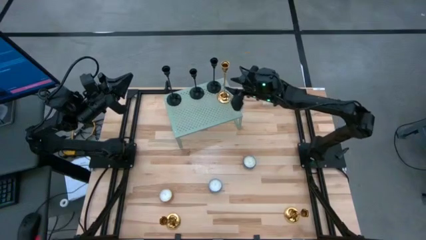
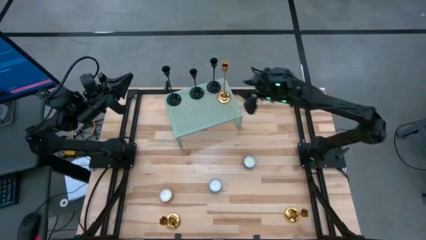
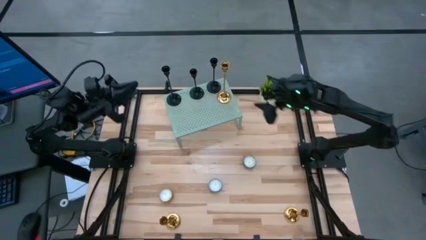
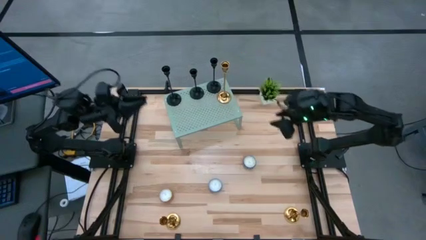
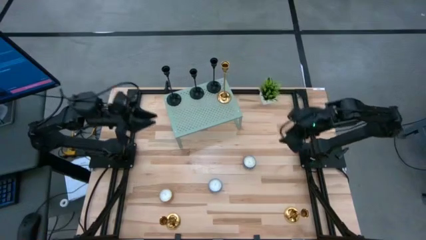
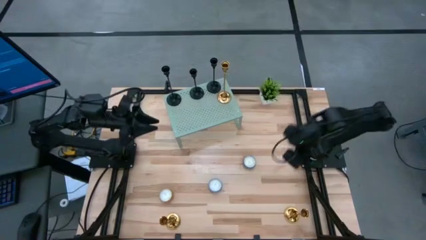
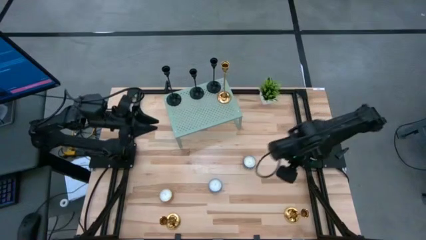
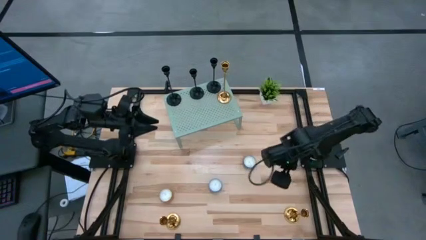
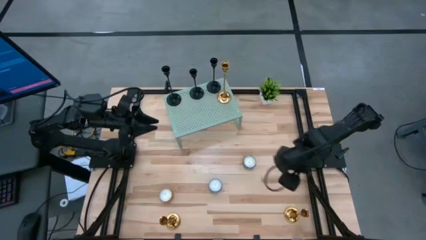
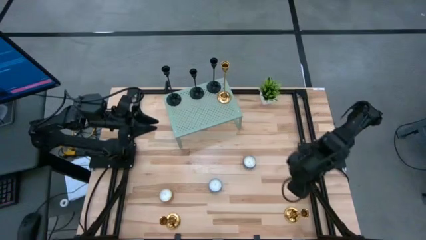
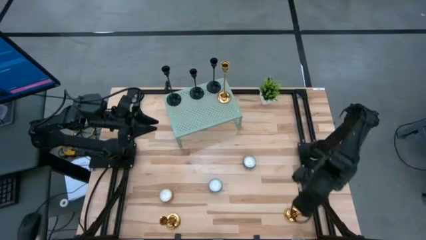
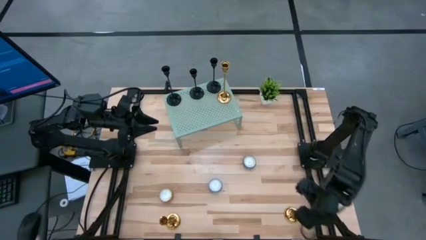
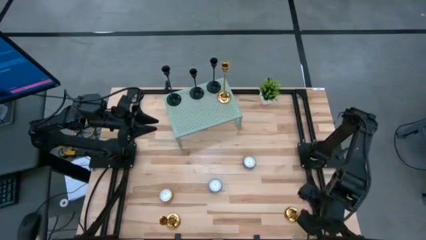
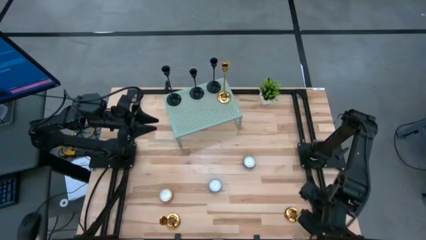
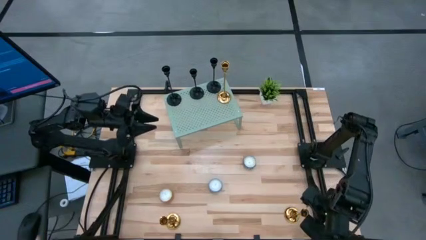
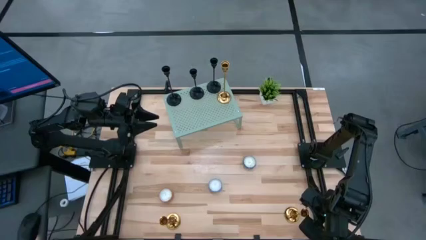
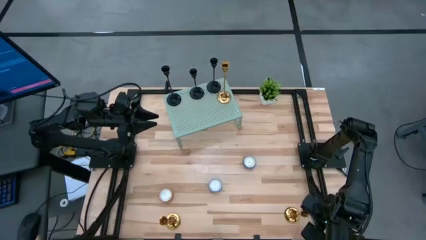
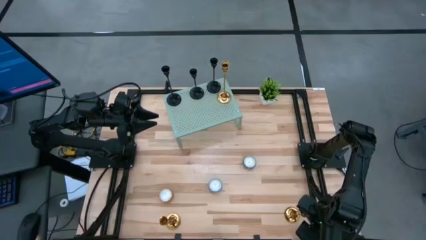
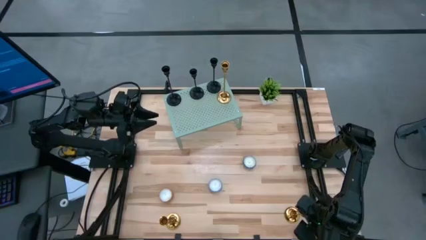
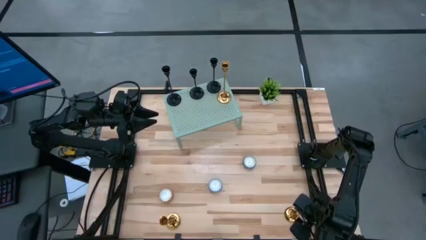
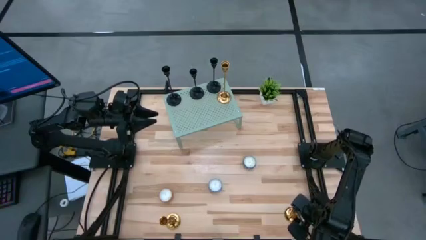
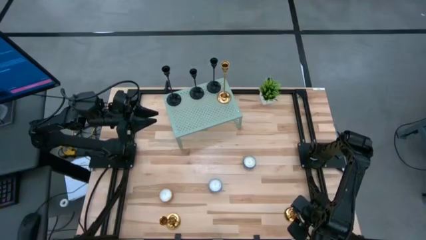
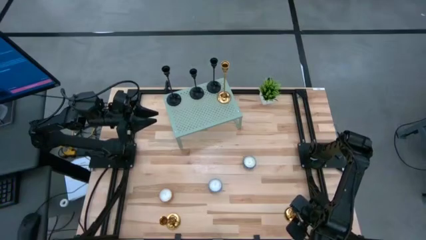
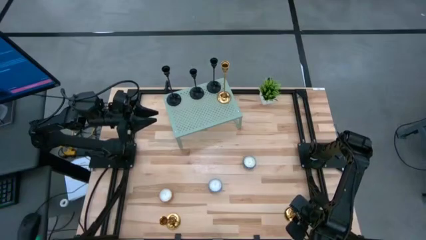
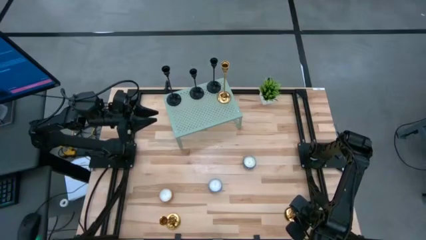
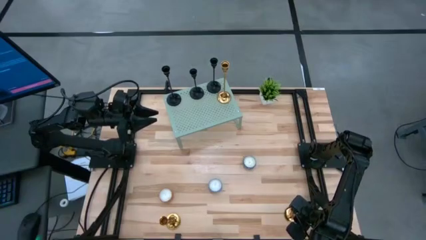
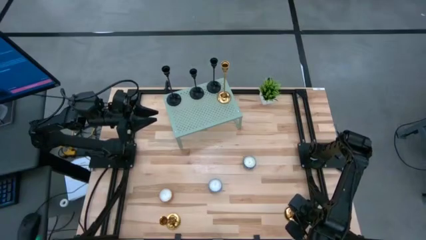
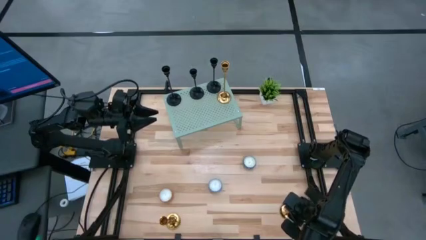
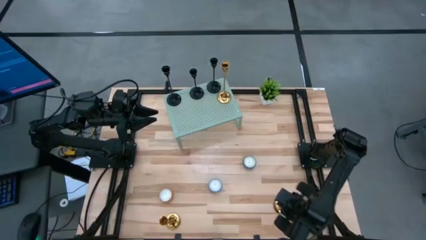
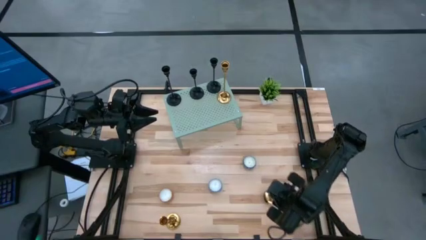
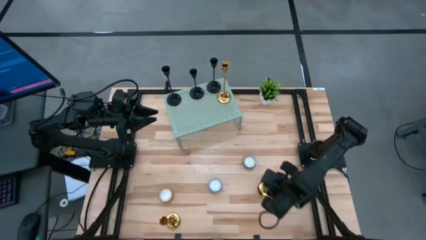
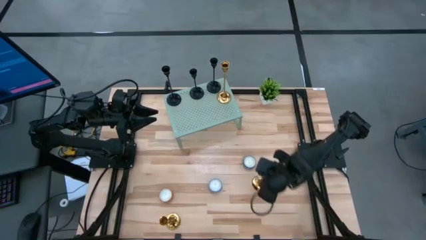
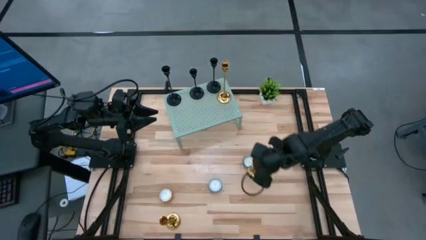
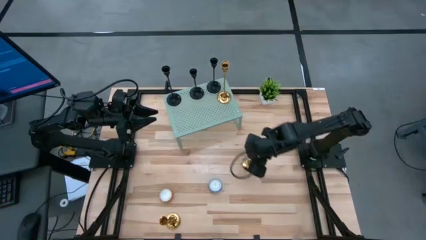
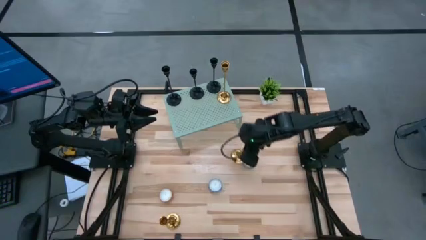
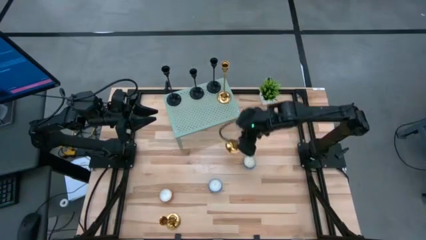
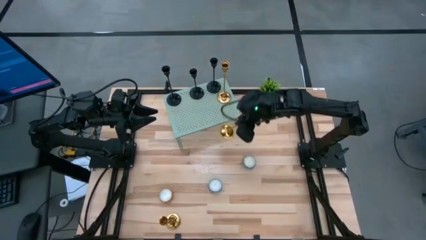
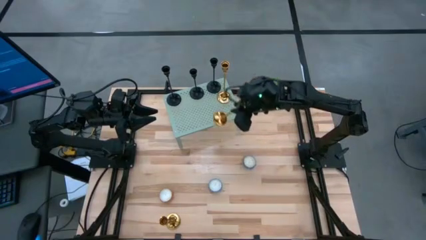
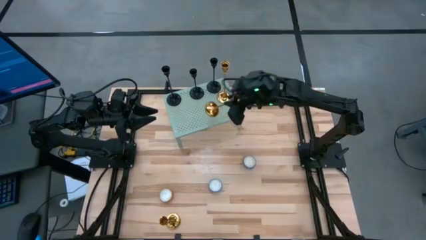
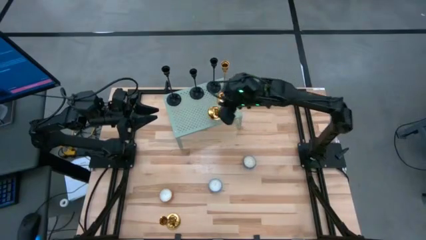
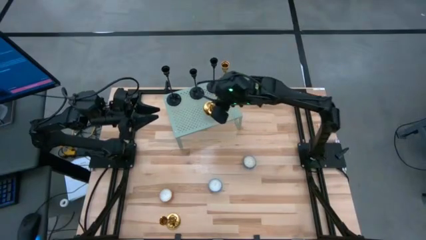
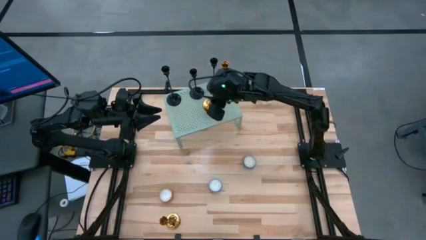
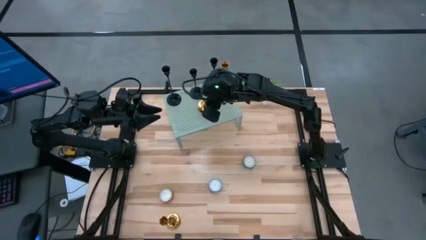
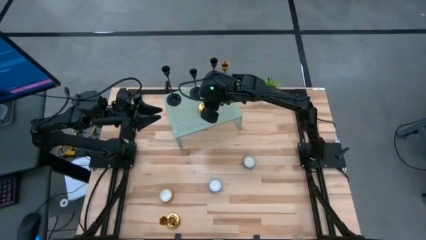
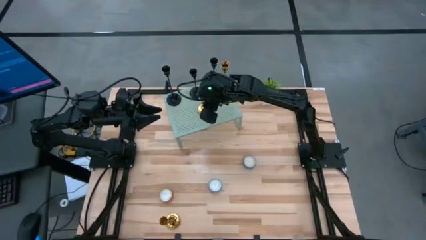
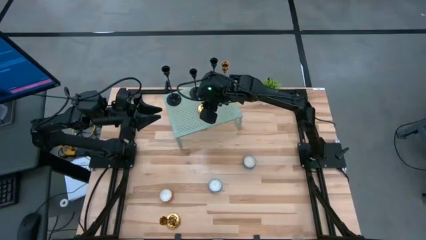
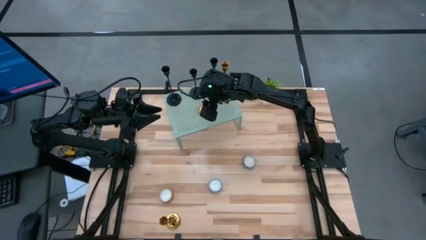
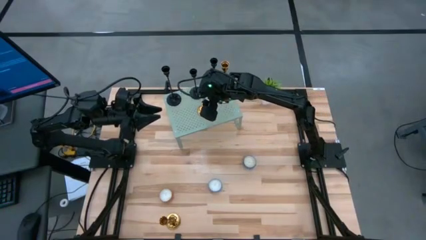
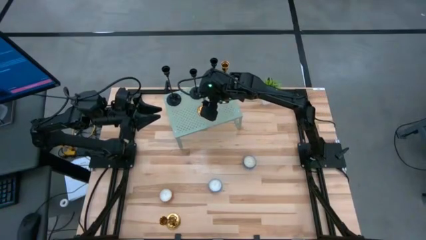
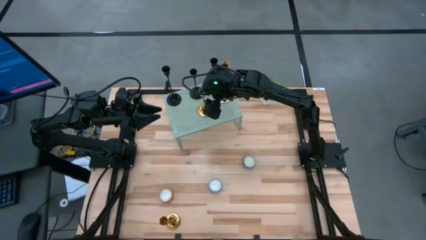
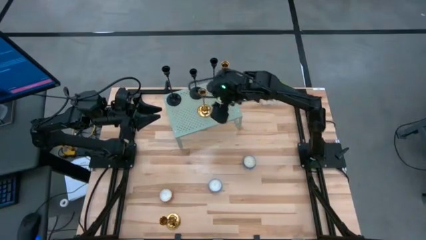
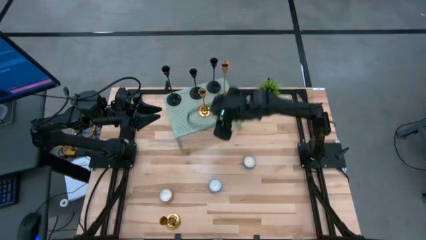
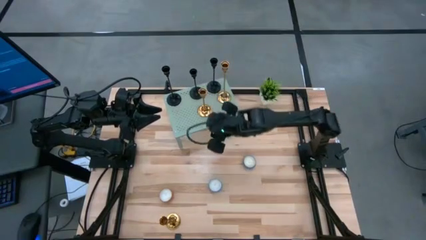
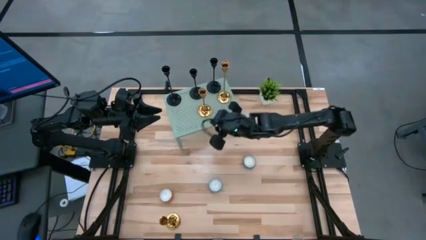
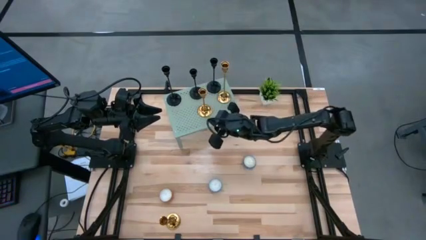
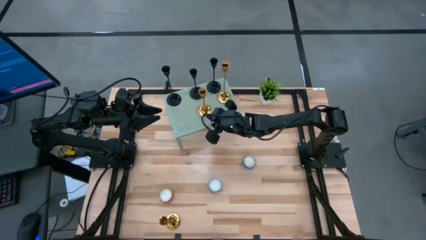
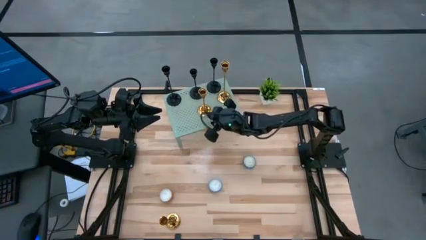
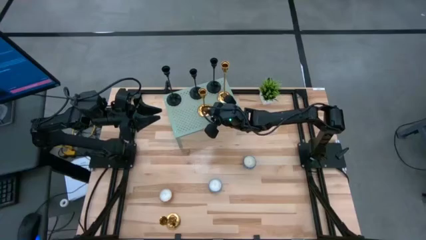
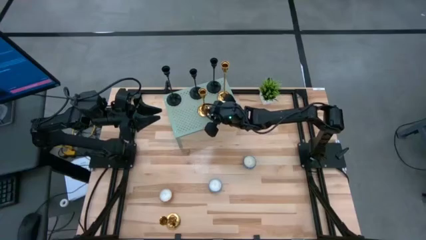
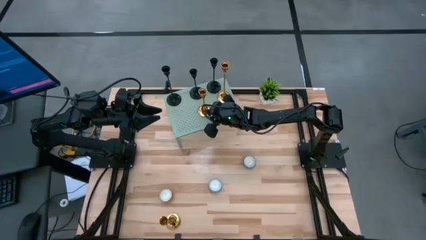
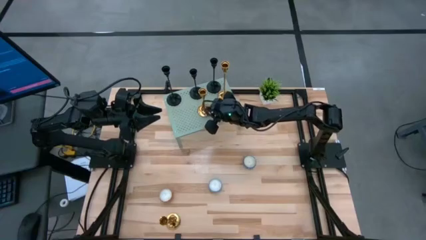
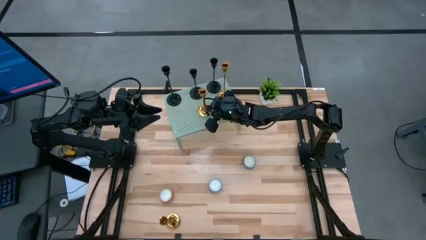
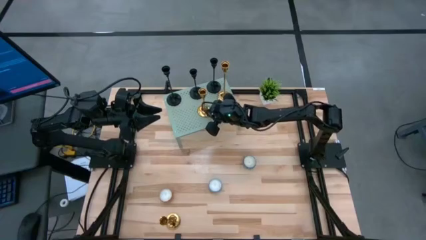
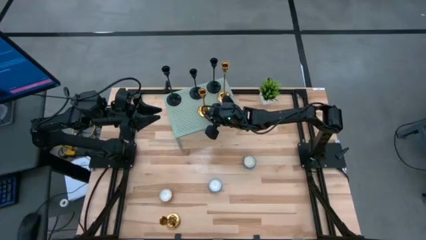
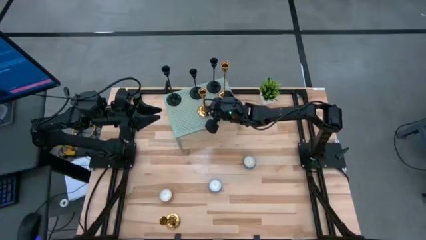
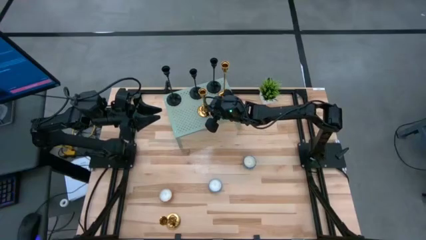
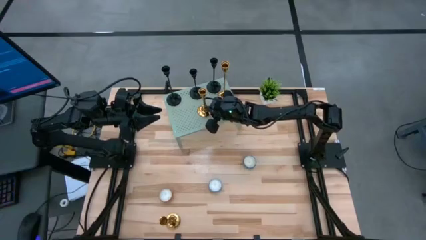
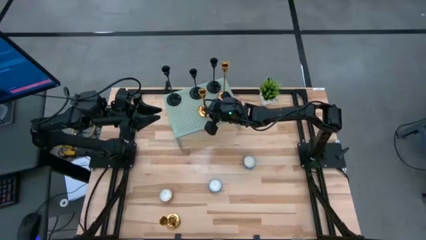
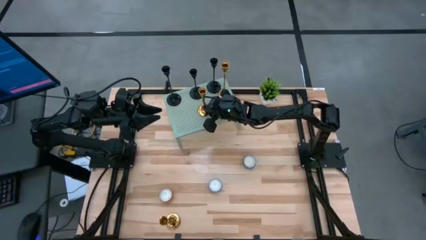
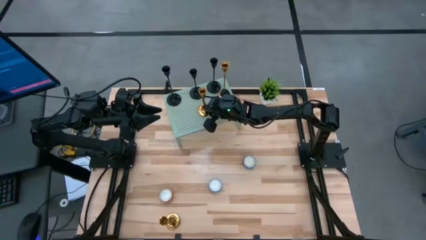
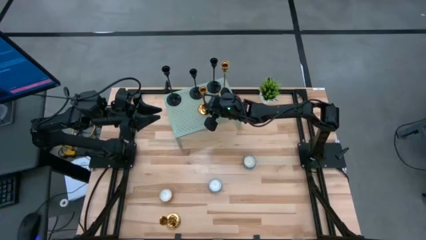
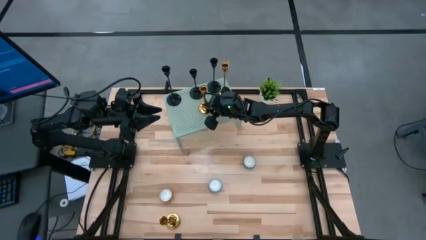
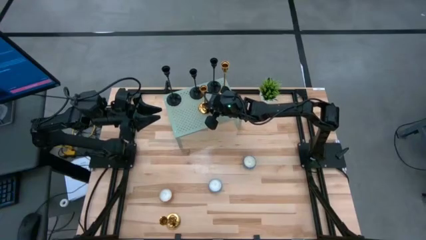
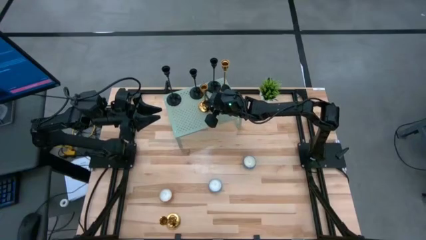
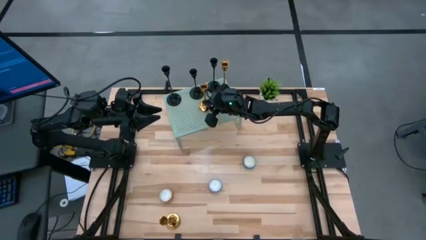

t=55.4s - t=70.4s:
Task: Pick & Place candle stick holders
Put the right gold candle holder on the shelf aligned with the other gold candle holder
